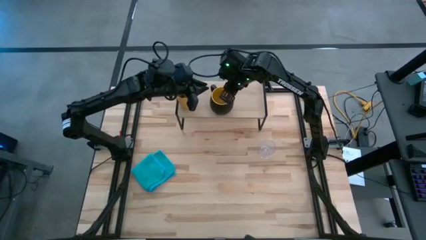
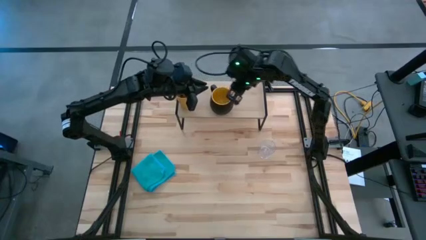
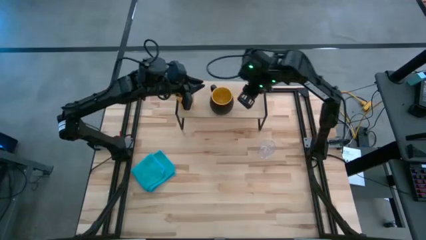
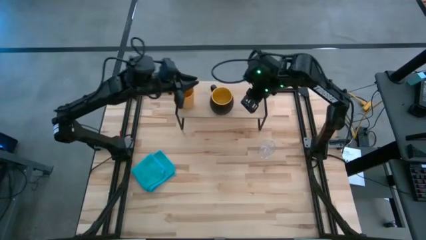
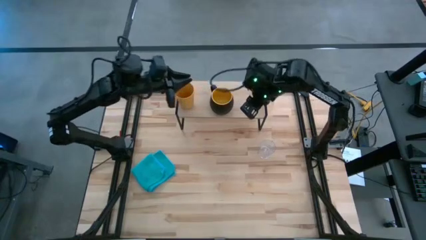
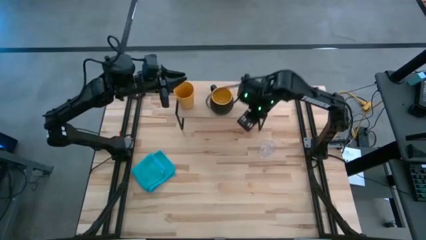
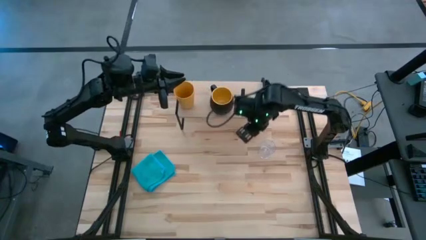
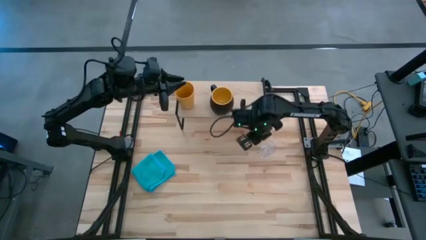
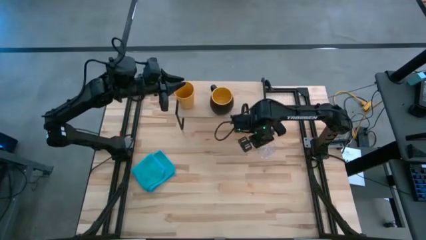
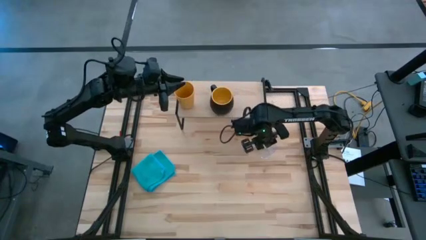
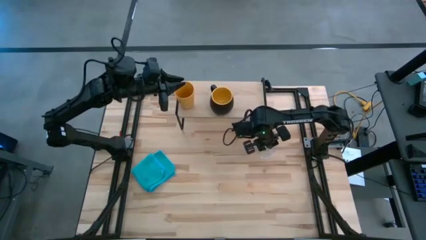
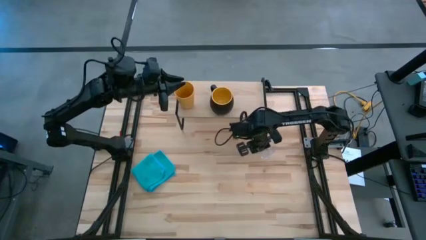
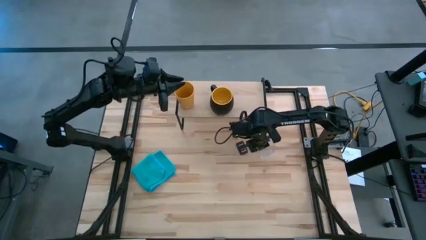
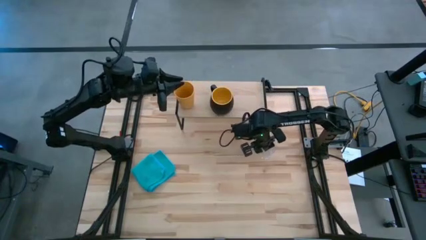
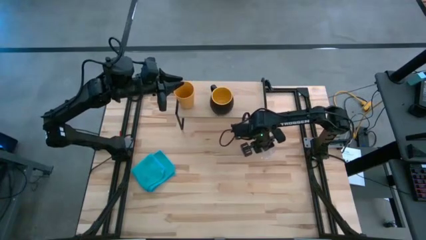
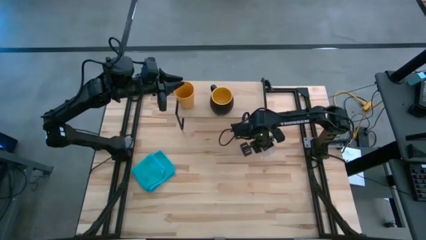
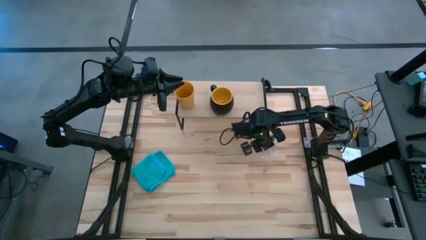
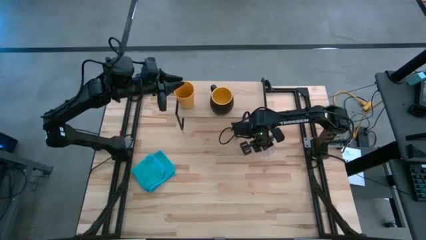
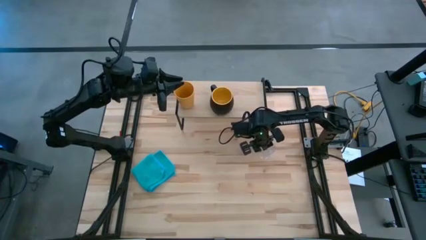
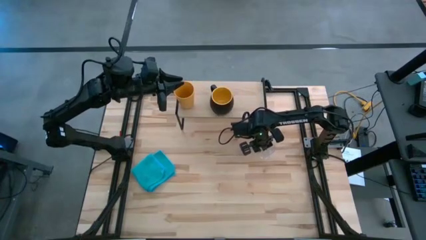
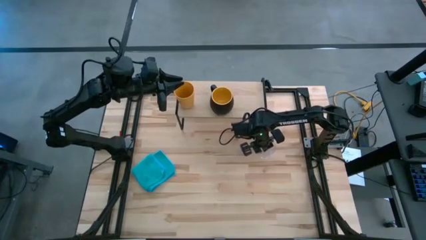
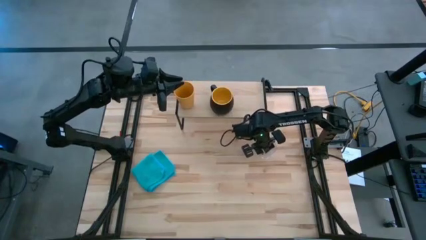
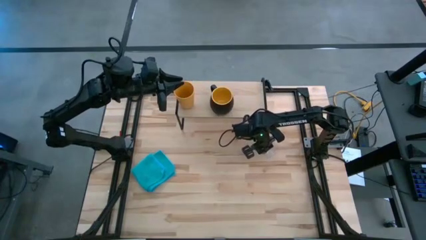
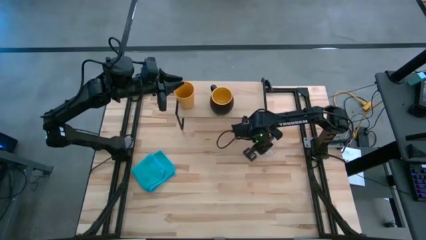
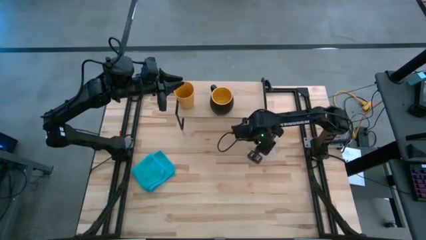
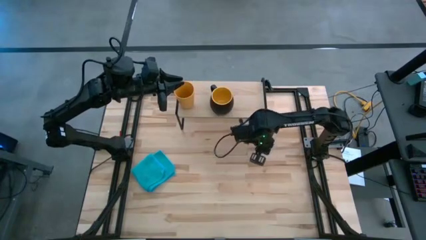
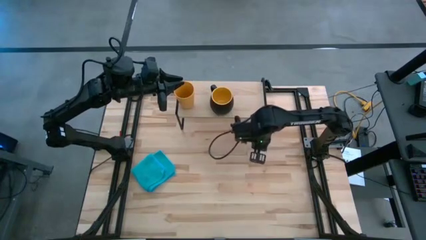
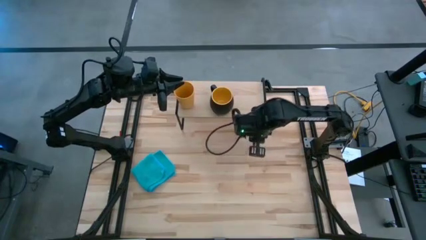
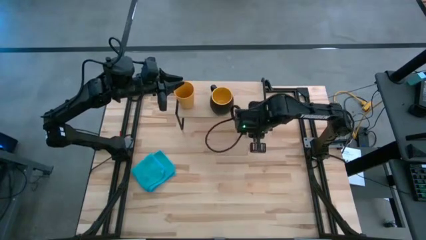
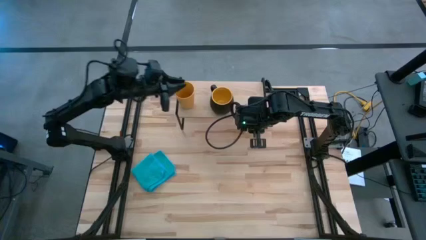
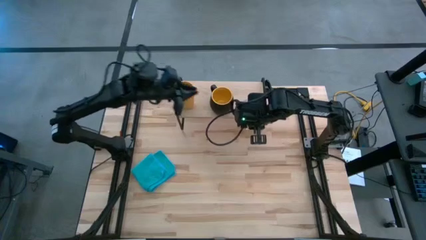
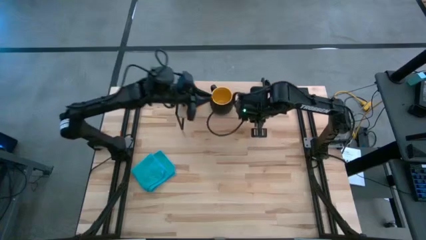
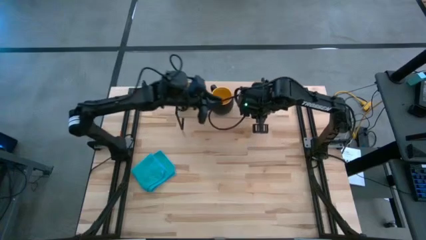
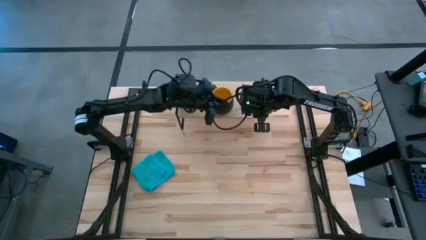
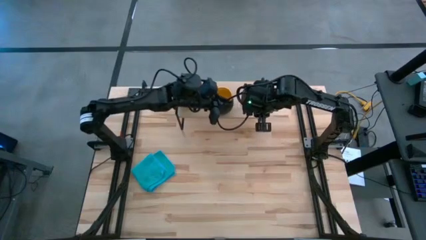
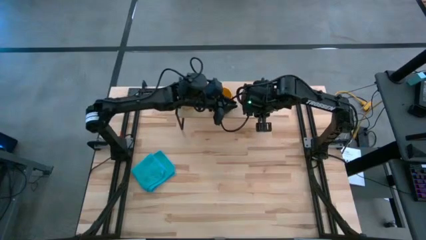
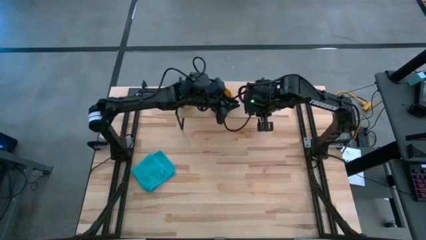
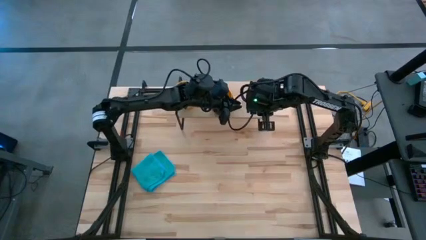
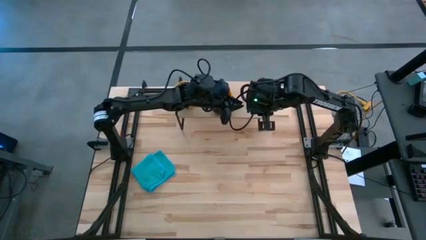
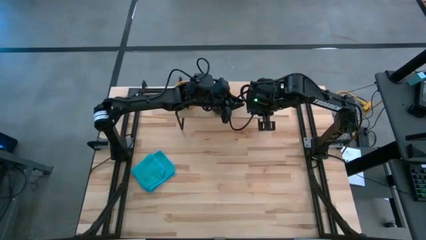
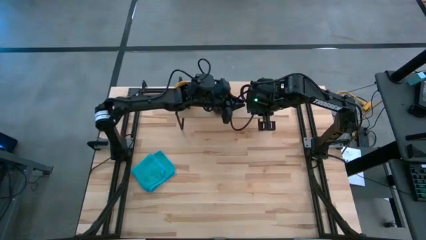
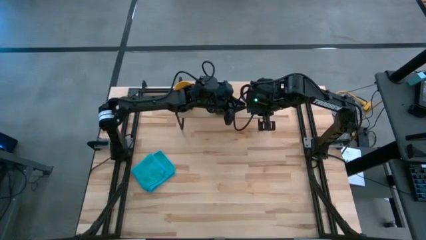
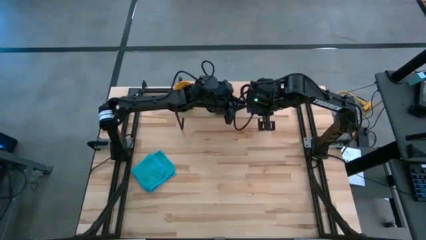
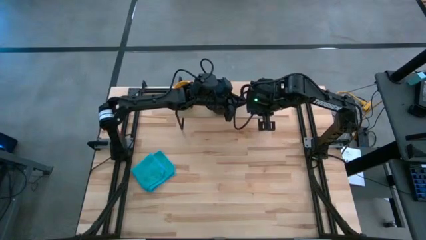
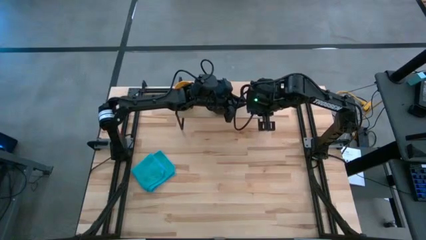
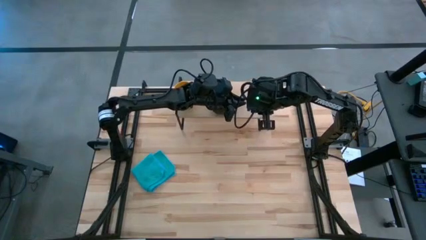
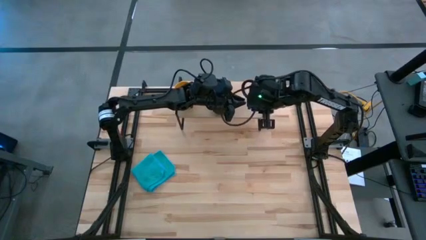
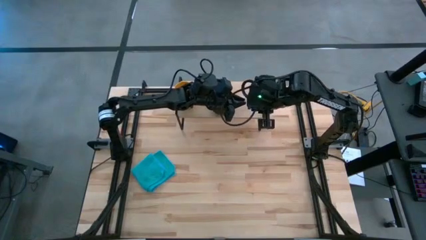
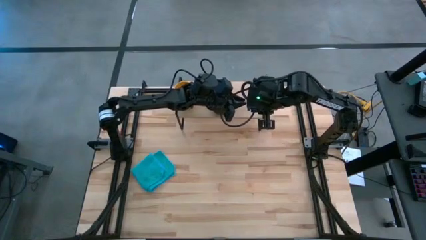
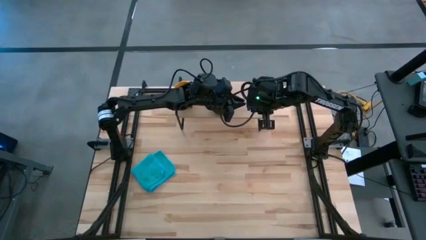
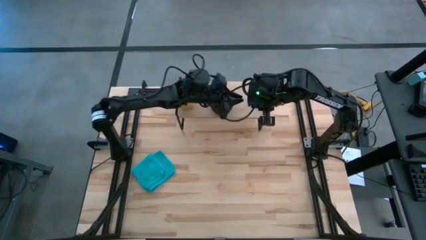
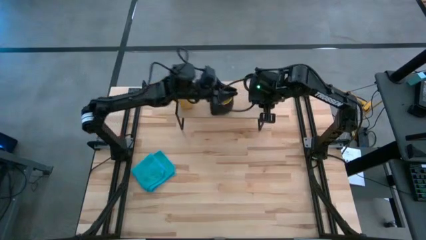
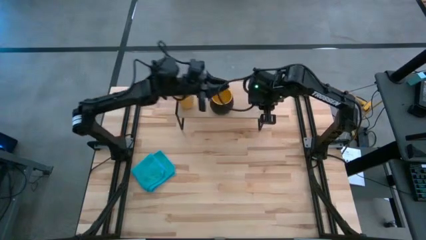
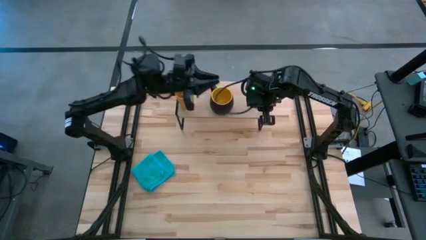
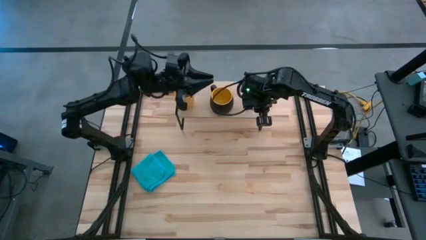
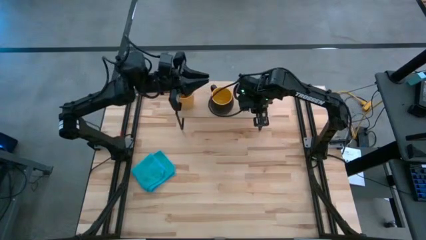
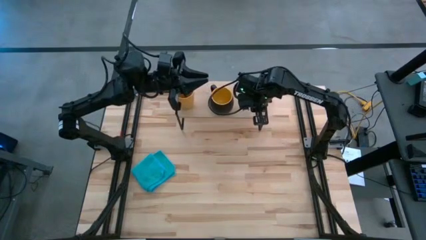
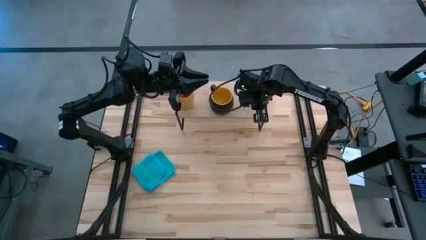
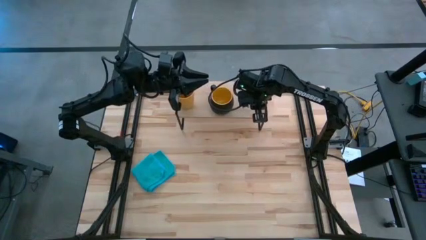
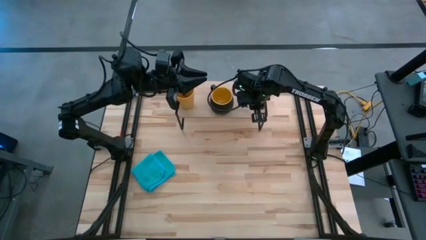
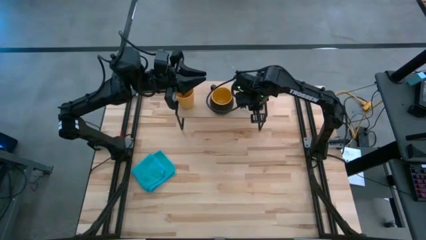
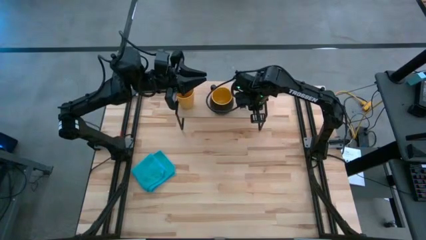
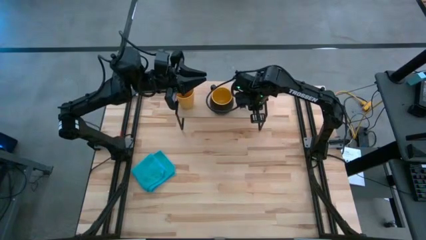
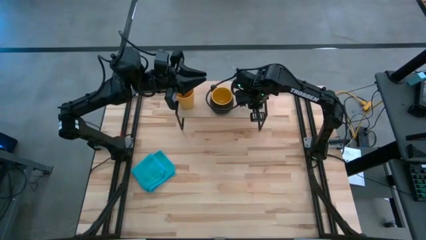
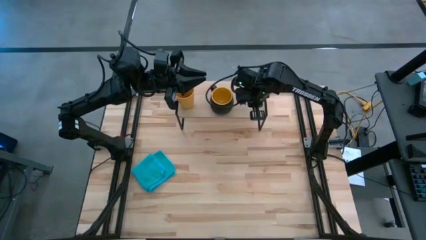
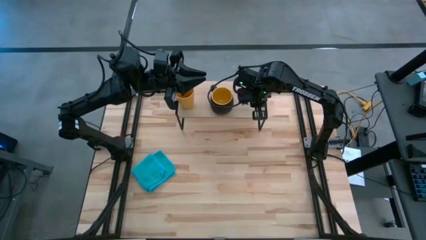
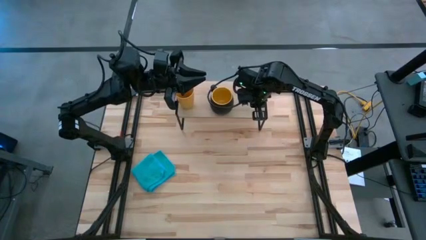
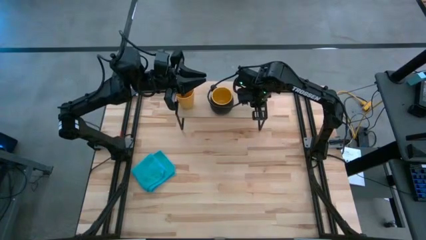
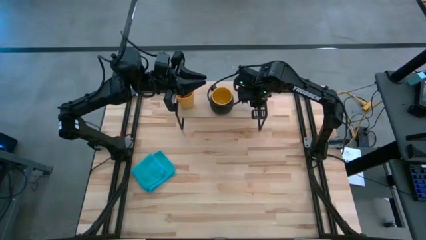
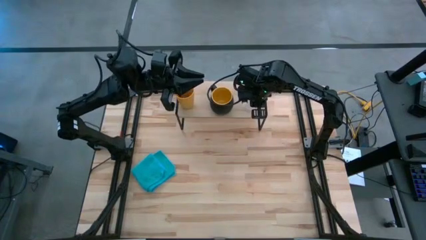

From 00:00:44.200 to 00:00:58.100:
Task: Stack small to large cups/mugs on shelf
Put the transparent mug on the shelf
